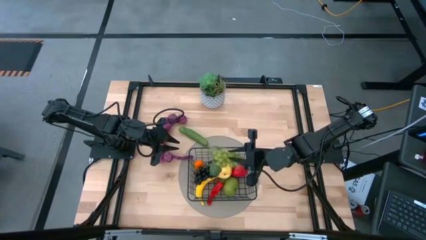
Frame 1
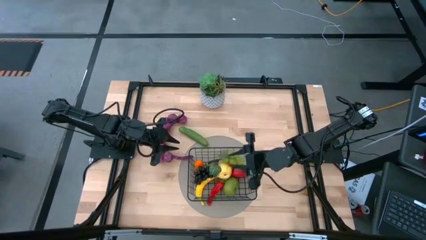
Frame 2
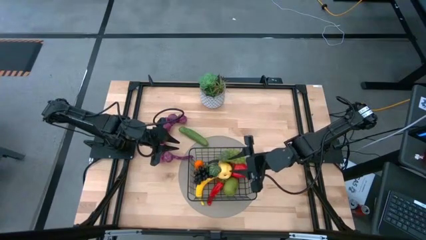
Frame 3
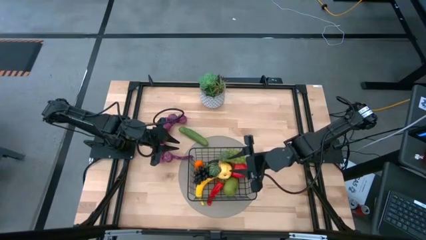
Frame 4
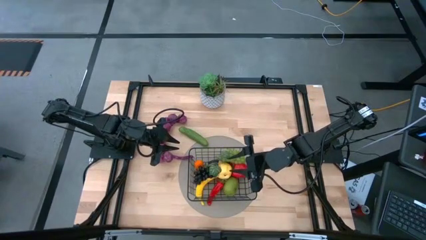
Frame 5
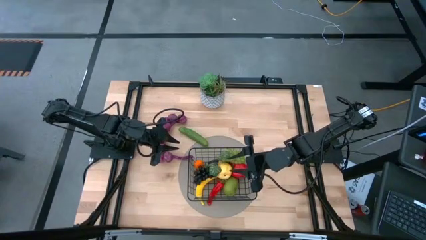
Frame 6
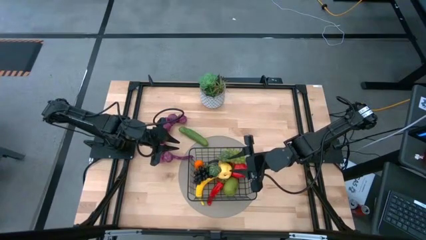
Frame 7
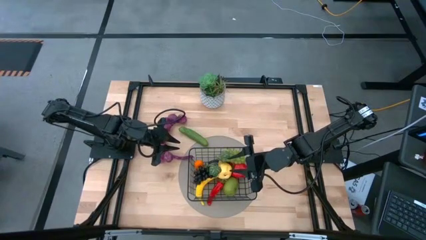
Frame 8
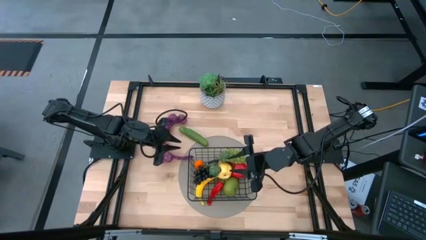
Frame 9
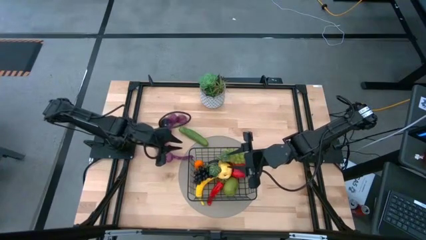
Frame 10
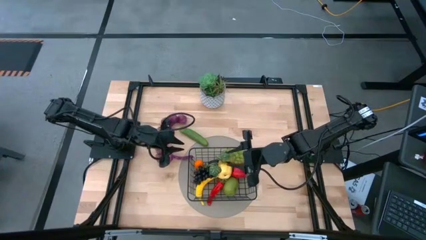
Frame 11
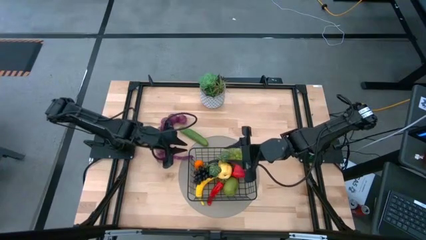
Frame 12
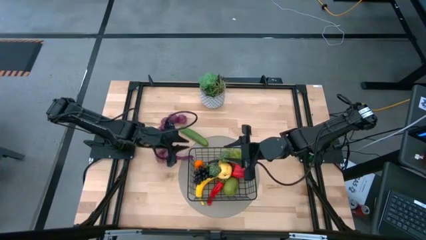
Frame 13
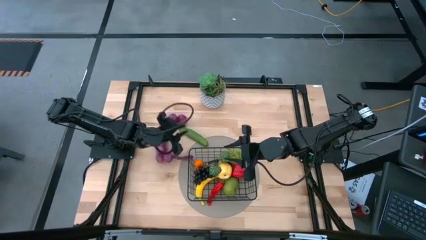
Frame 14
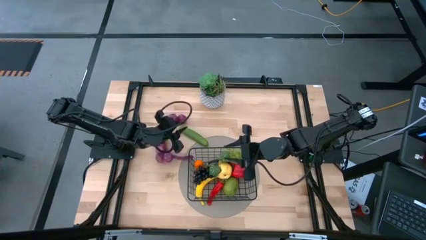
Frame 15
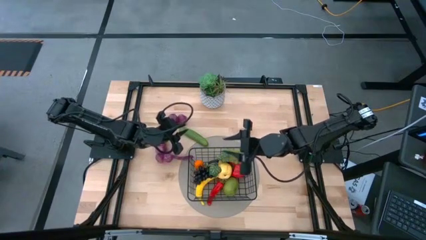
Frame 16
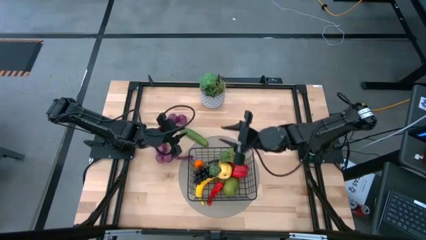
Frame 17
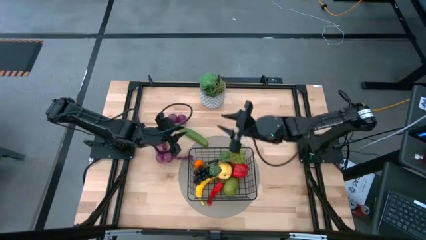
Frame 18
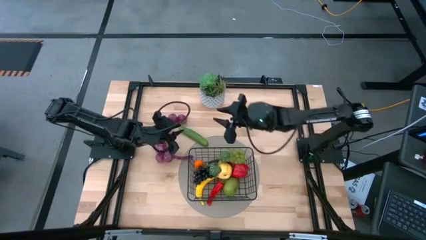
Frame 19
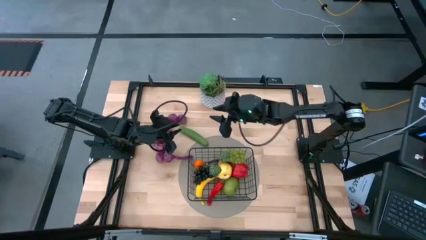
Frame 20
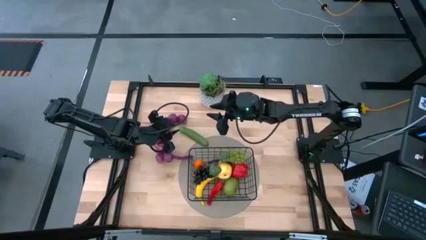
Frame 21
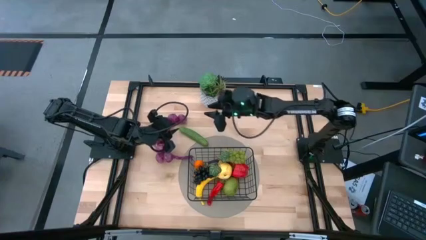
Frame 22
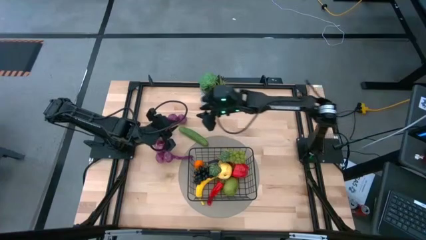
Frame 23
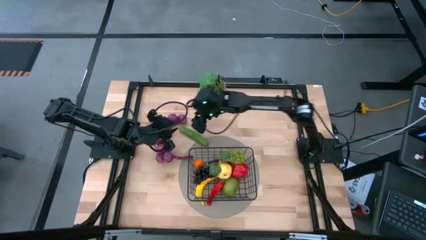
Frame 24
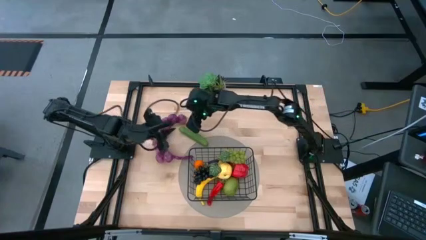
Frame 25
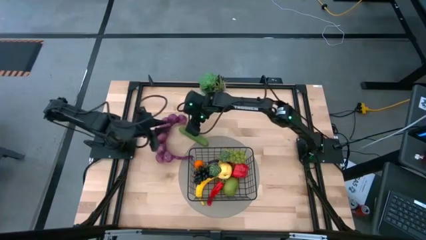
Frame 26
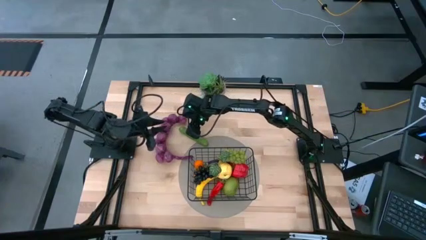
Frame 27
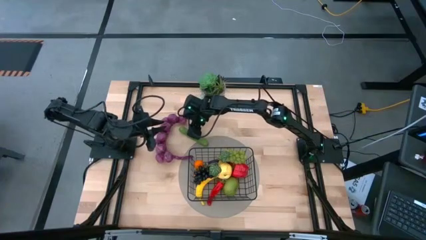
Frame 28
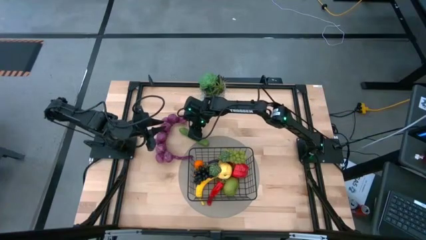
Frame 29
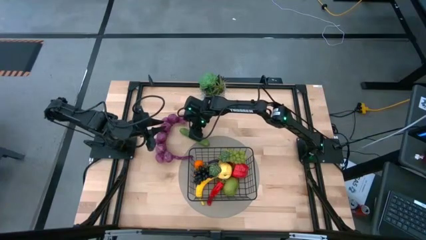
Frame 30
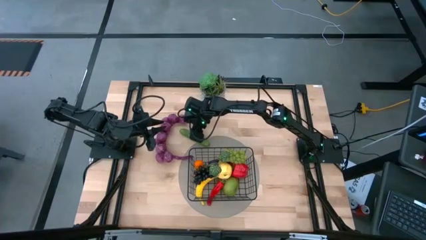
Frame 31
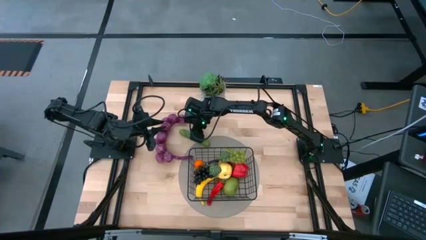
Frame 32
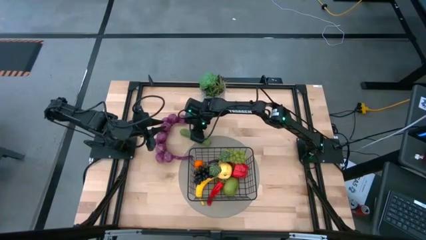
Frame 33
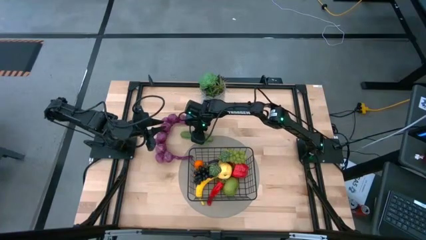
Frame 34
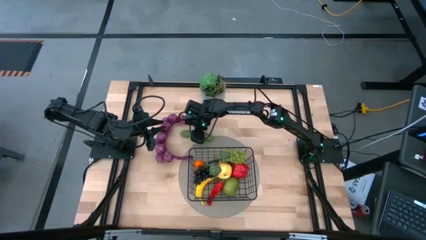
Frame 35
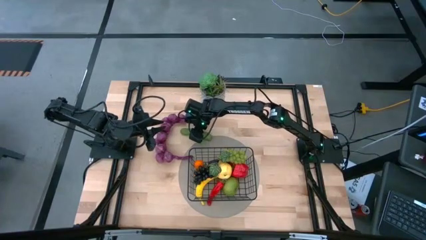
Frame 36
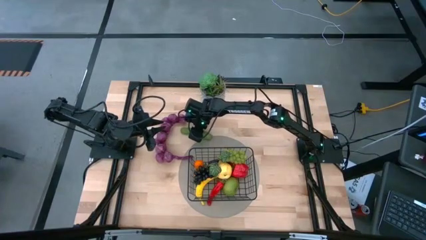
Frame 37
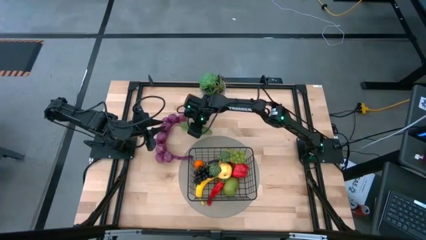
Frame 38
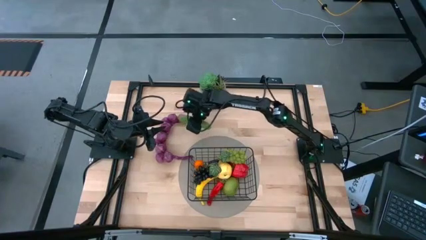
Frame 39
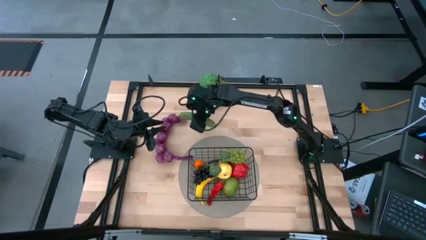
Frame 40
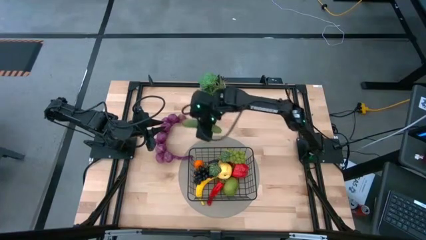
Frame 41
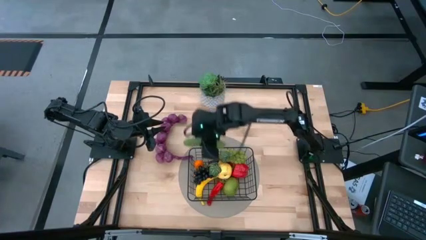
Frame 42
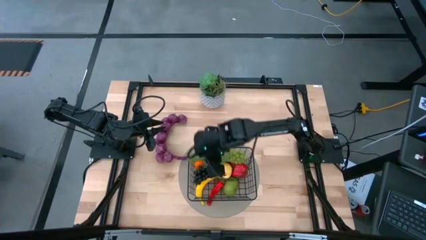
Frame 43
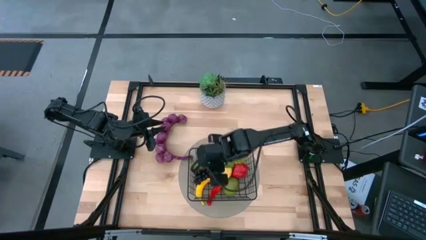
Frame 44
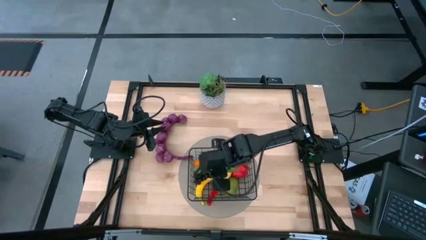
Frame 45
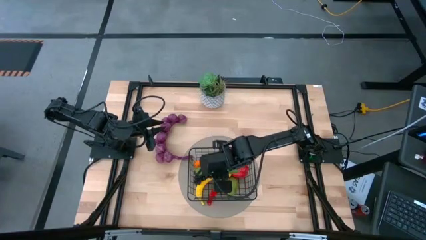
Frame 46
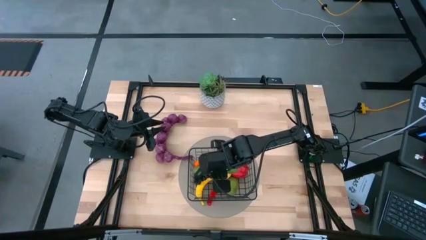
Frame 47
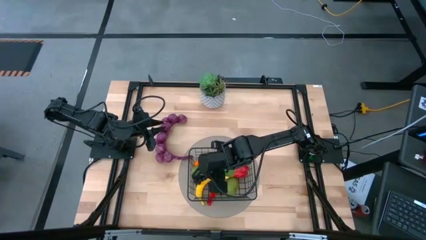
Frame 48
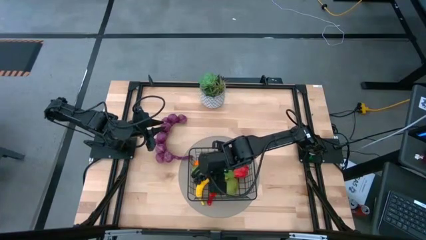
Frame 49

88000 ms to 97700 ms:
Task: Build produce basket
Put the green cucumber into the black wire basket

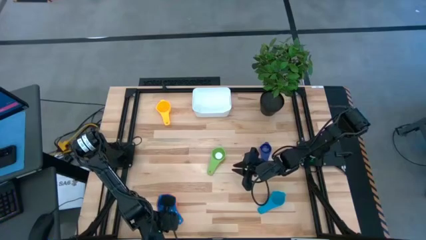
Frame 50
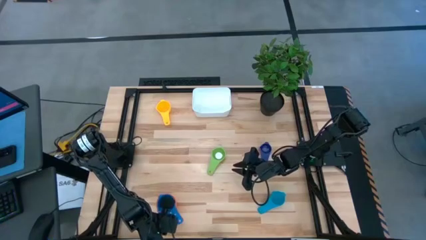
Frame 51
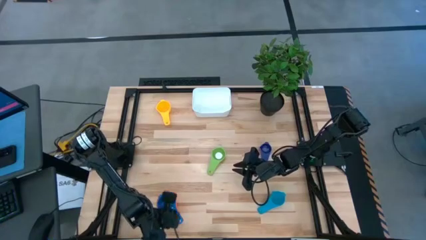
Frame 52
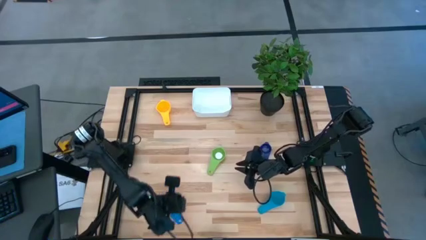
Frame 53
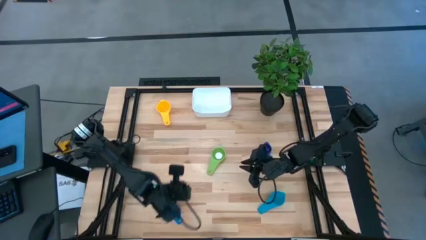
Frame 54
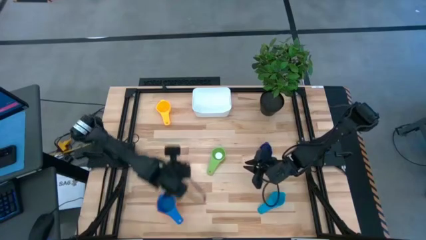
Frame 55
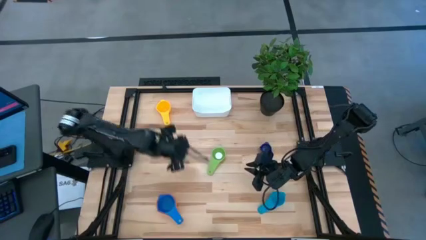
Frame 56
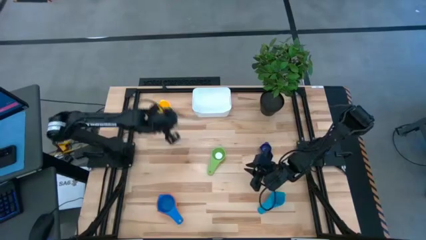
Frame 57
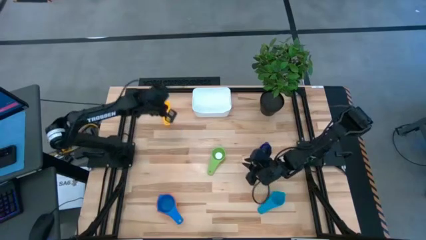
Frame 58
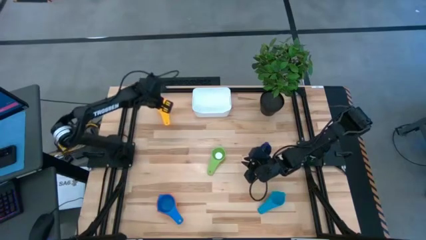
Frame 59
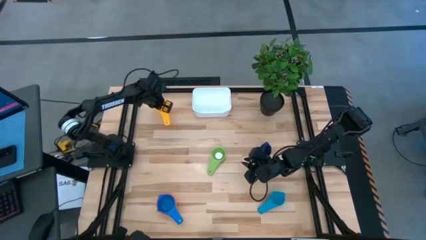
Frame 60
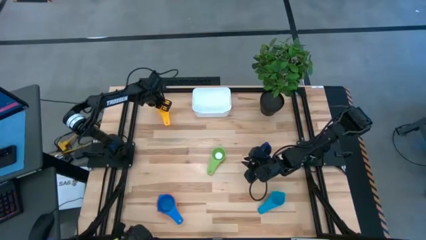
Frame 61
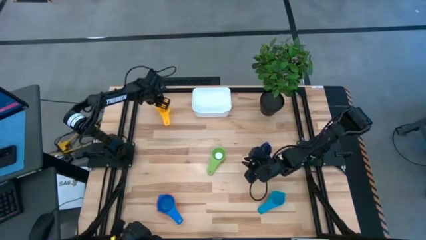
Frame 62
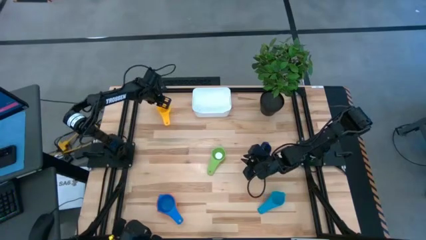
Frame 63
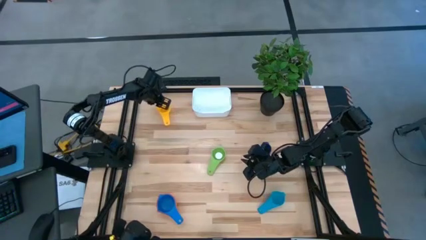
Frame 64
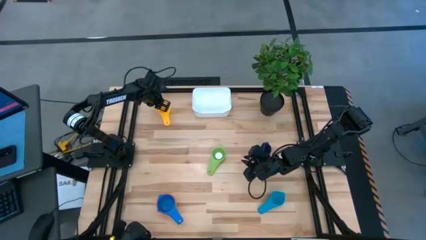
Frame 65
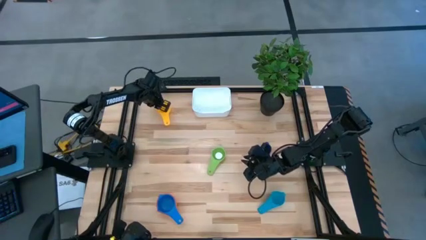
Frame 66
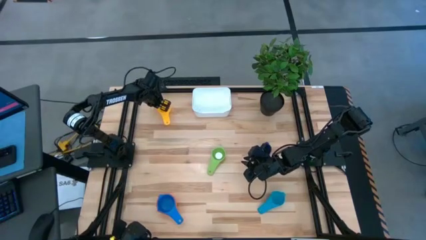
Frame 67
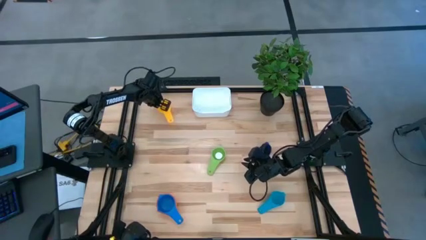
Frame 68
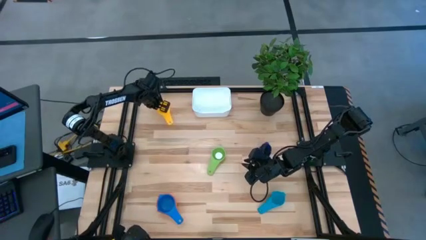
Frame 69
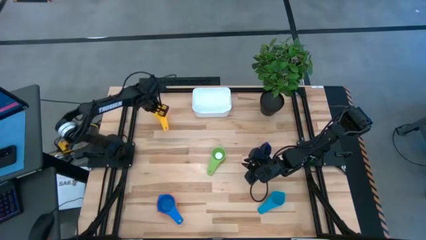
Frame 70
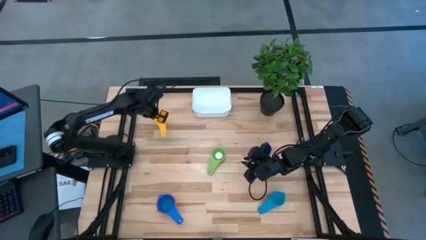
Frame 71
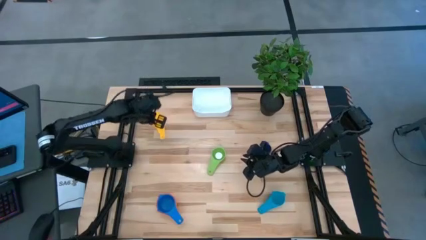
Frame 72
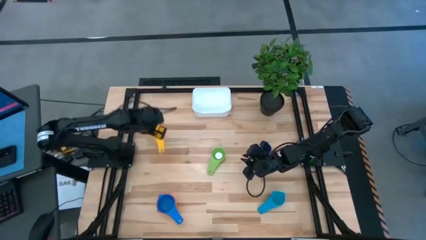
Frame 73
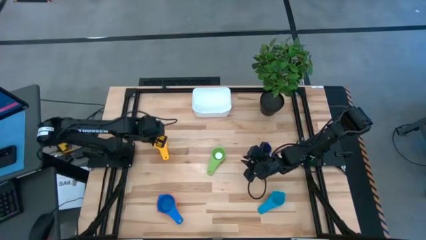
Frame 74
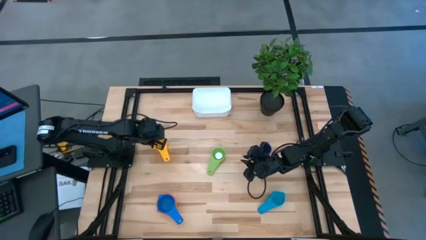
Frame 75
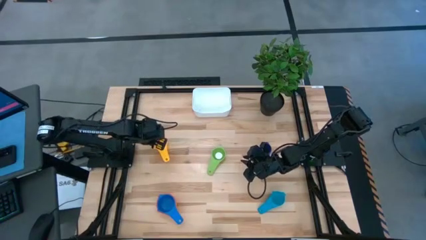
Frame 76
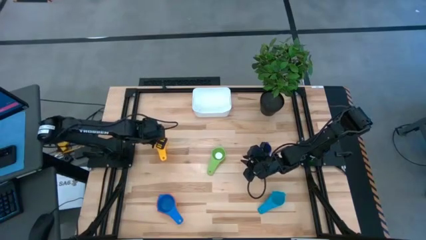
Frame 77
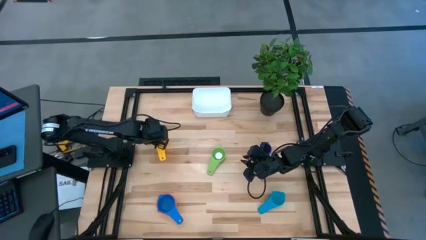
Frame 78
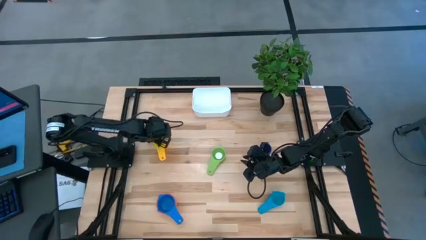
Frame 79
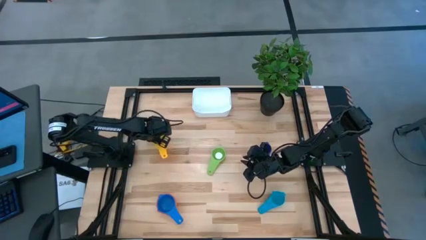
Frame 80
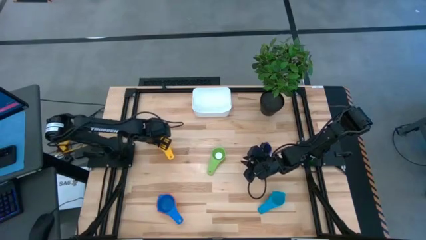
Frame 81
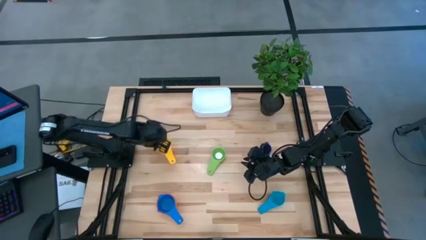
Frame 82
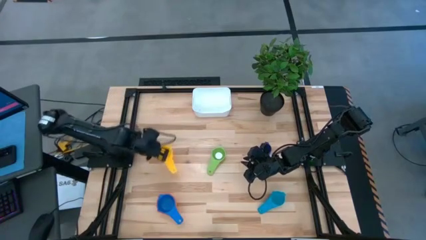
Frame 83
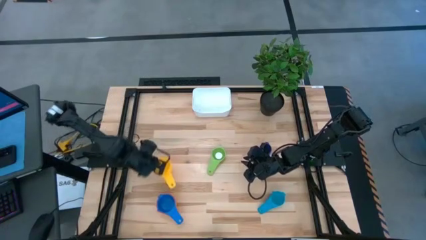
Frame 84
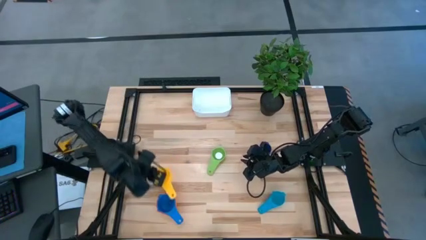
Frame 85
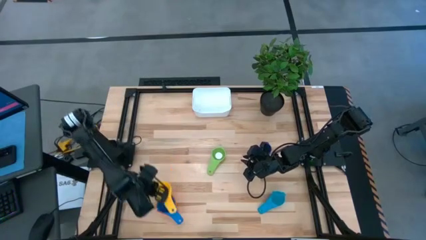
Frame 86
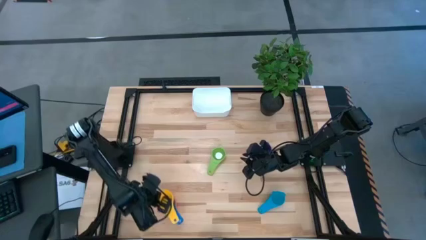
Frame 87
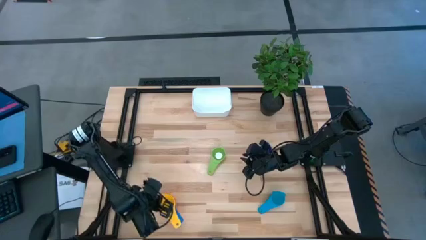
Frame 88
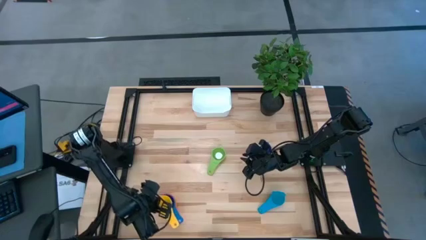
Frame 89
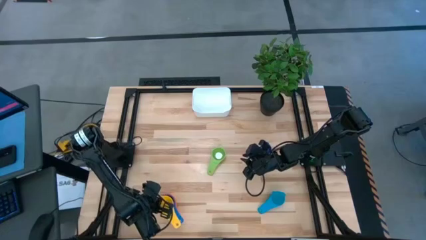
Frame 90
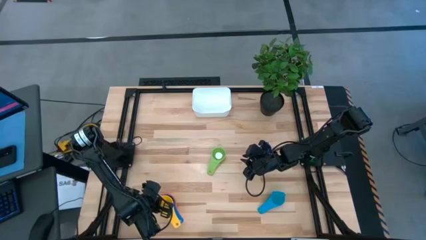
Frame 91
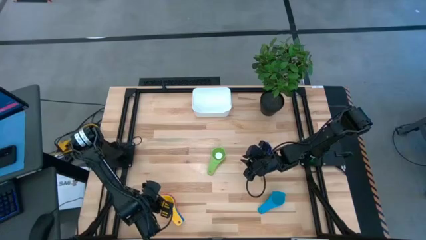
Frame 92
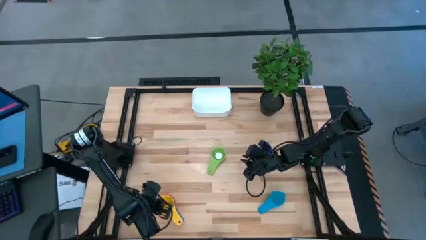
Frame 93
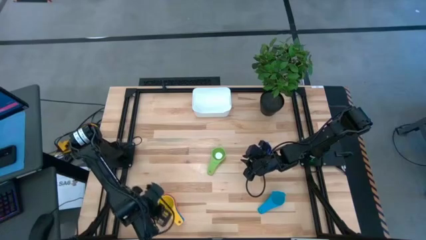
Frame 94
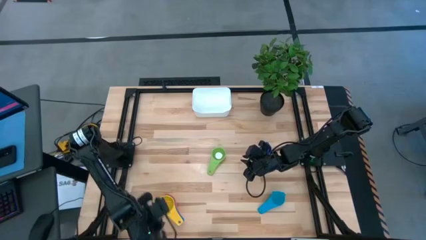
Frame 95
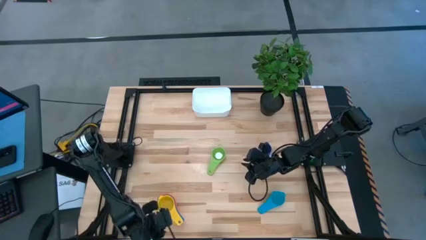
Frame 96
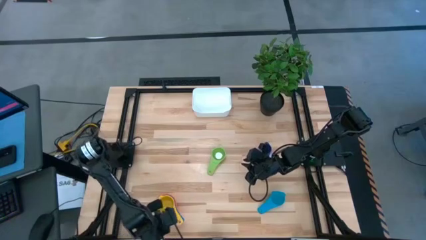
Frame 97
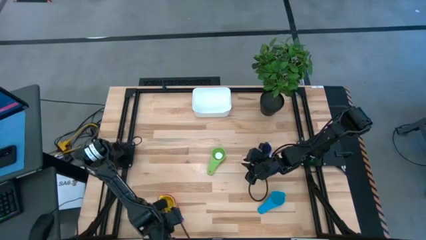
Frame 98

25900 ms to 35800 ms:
Task: Nest measuring cups in basket
Stack the yellow measuring cup into the dark blue measuring cup
